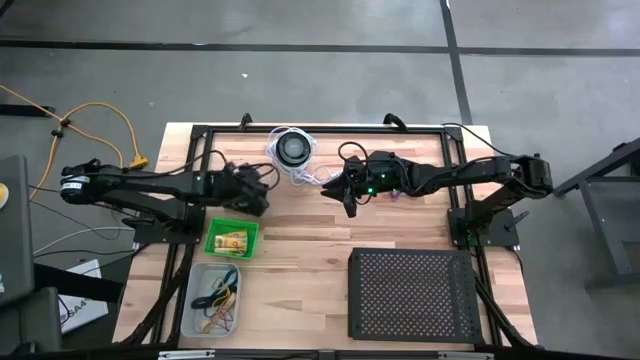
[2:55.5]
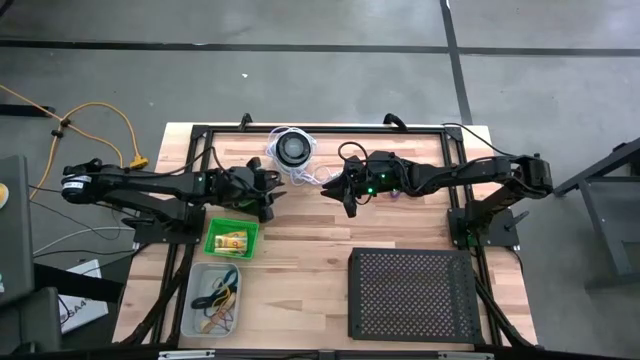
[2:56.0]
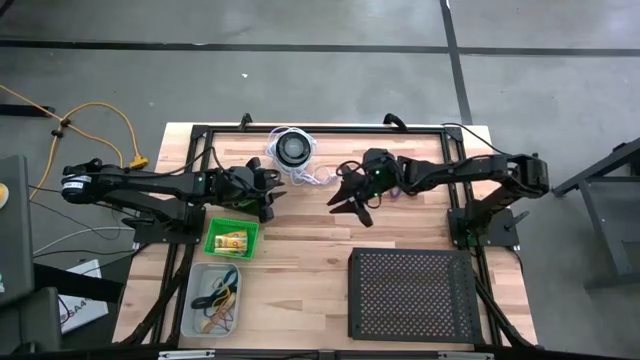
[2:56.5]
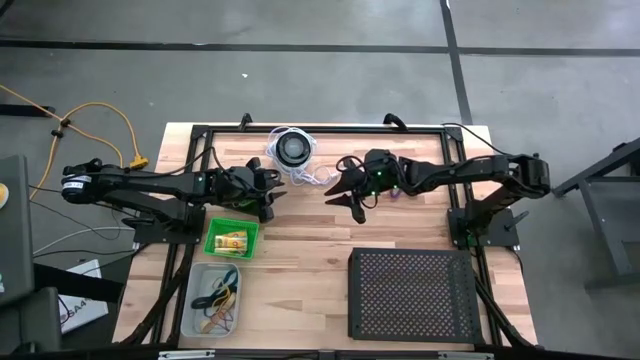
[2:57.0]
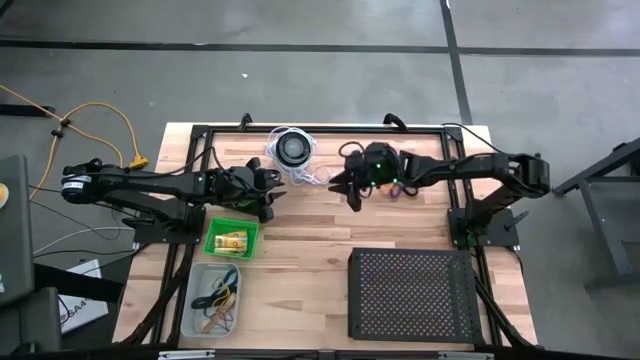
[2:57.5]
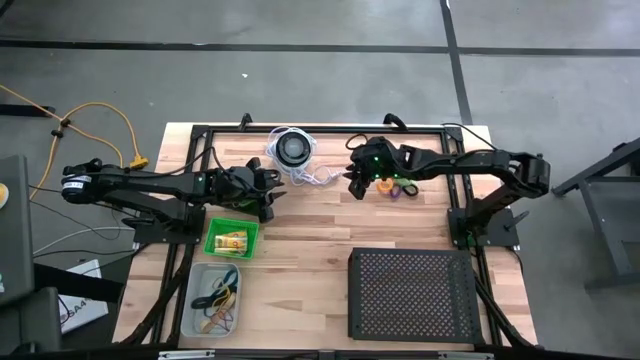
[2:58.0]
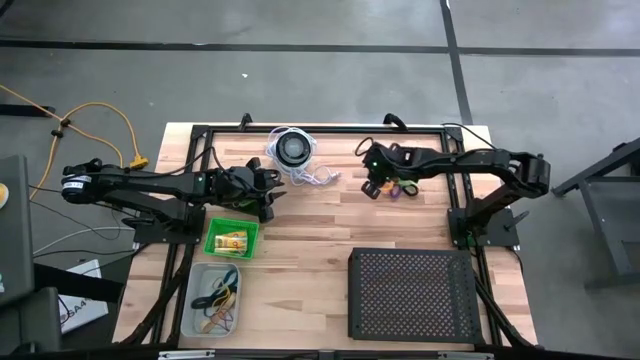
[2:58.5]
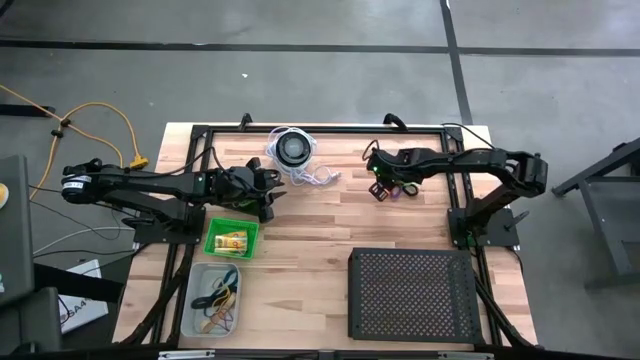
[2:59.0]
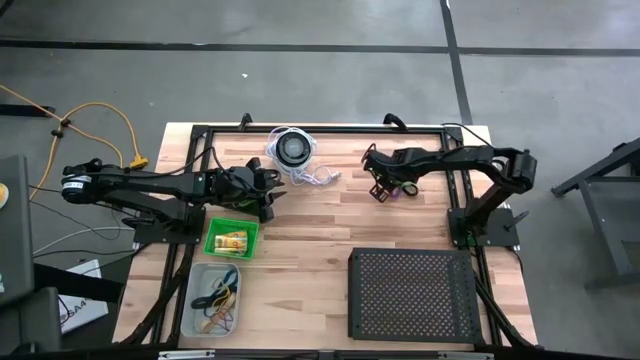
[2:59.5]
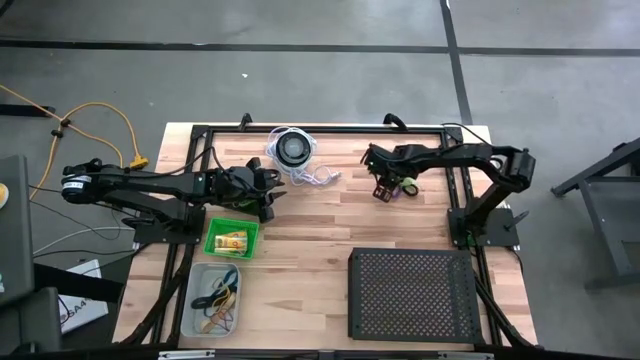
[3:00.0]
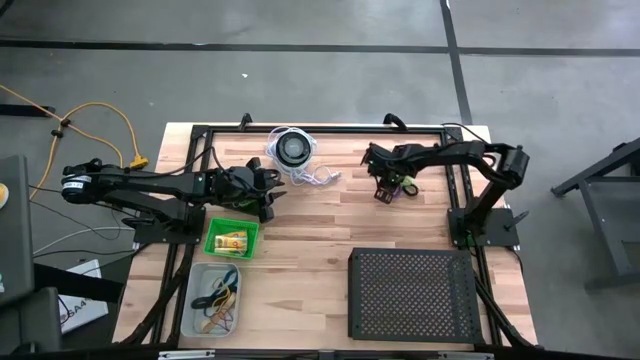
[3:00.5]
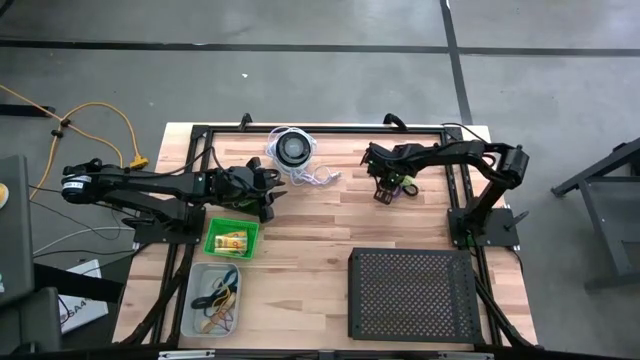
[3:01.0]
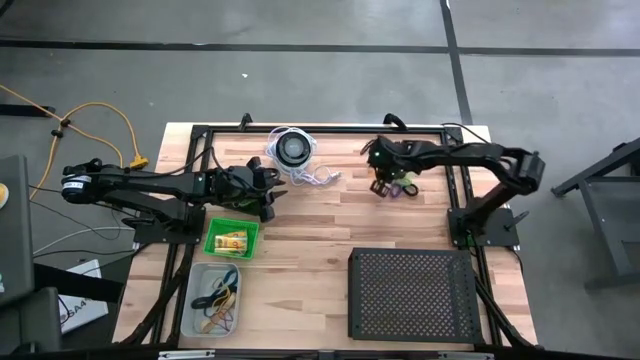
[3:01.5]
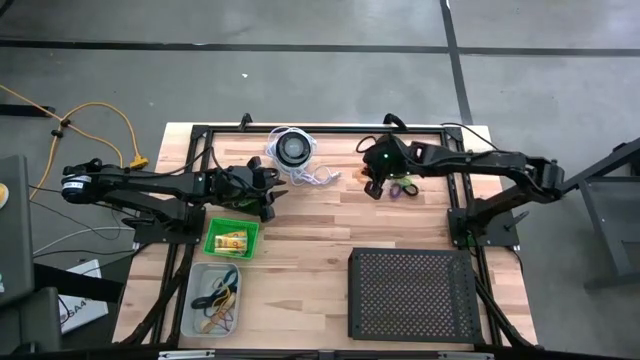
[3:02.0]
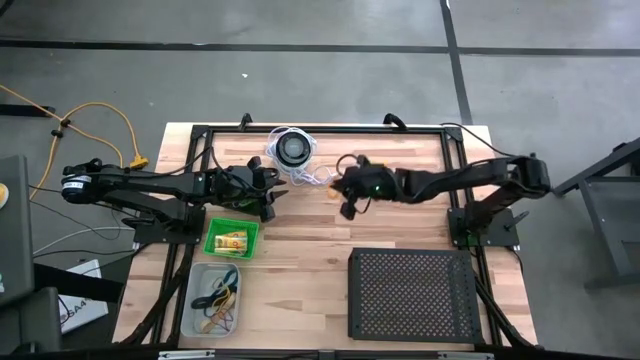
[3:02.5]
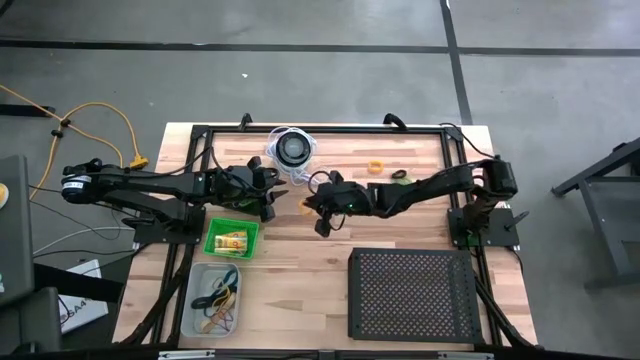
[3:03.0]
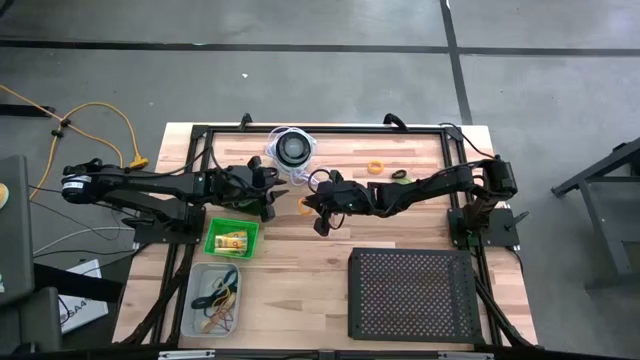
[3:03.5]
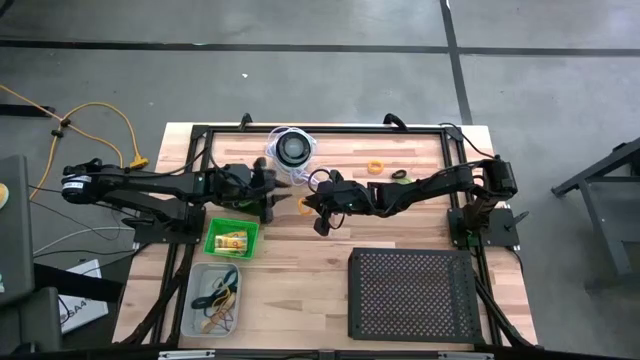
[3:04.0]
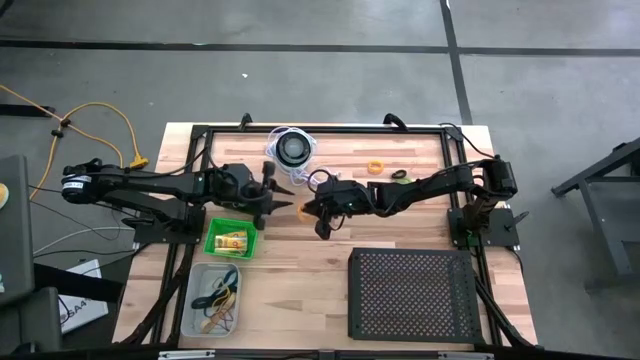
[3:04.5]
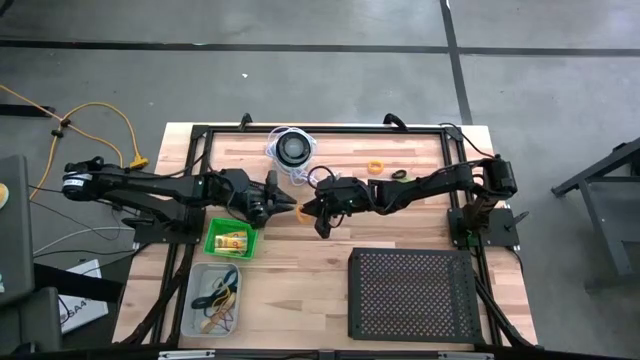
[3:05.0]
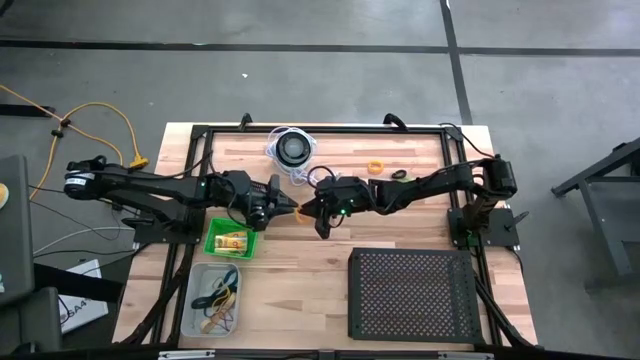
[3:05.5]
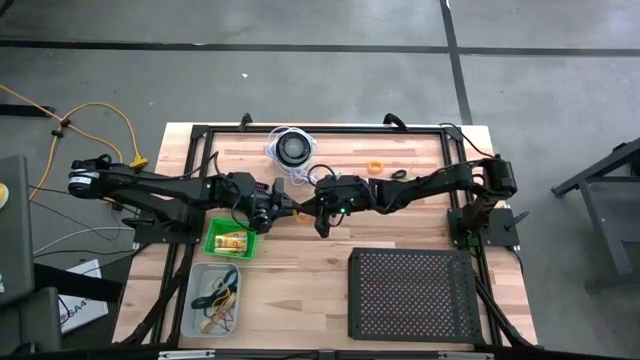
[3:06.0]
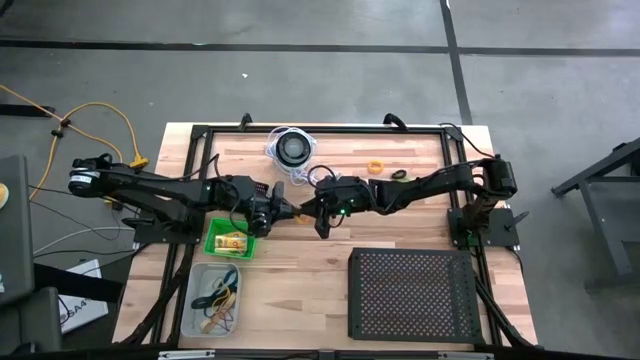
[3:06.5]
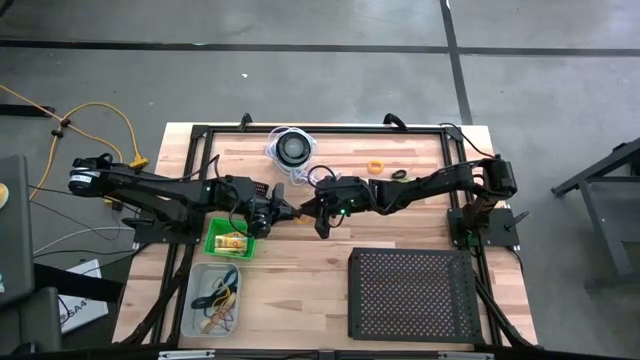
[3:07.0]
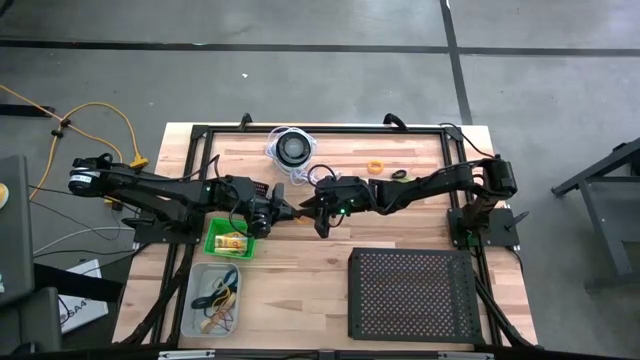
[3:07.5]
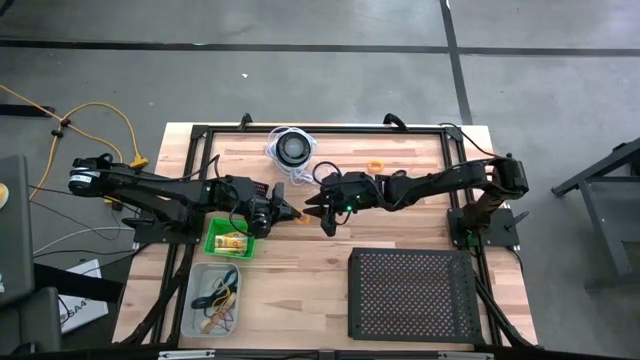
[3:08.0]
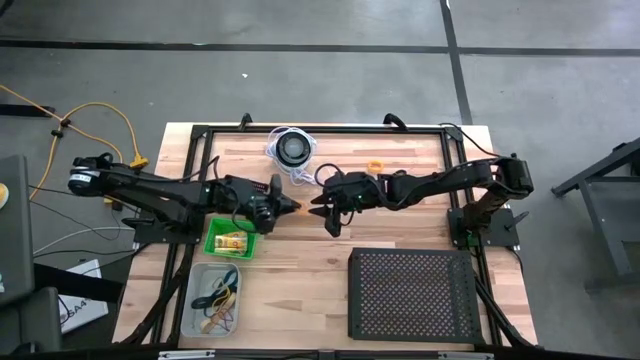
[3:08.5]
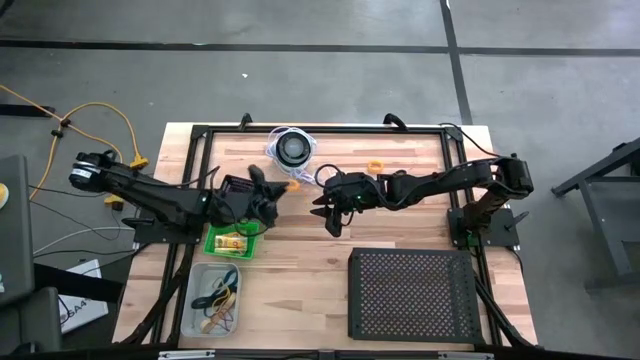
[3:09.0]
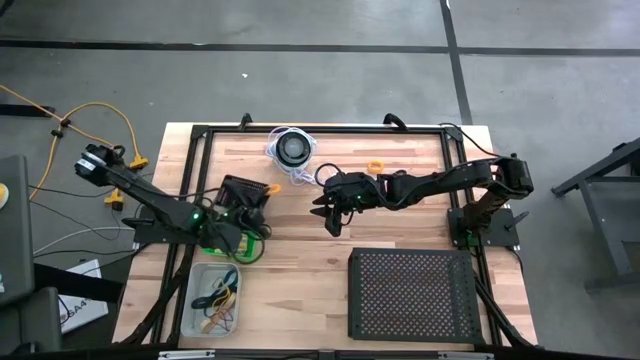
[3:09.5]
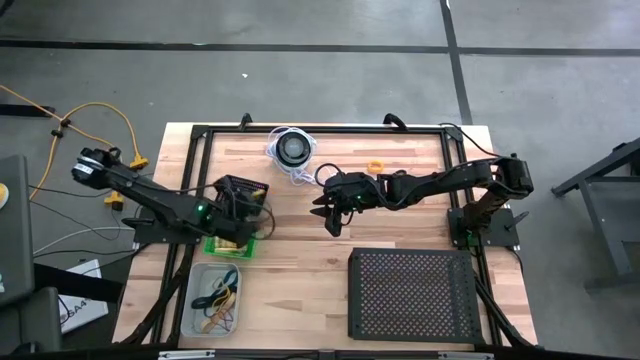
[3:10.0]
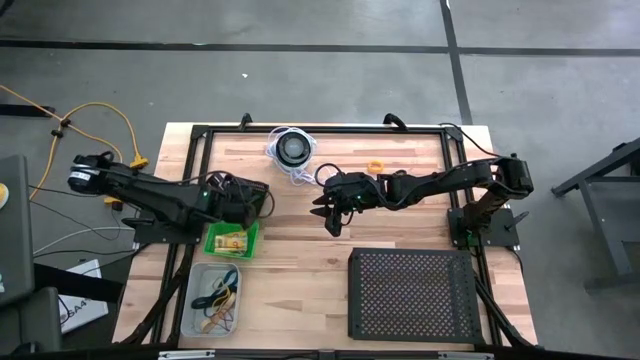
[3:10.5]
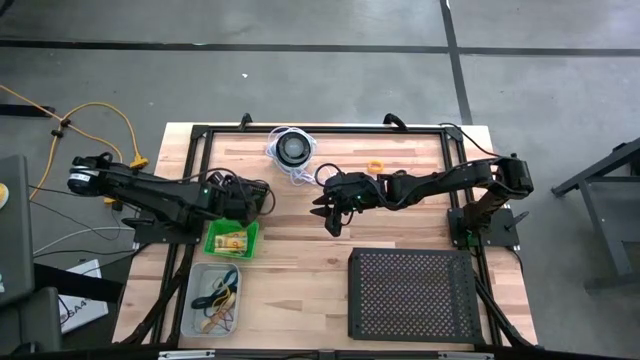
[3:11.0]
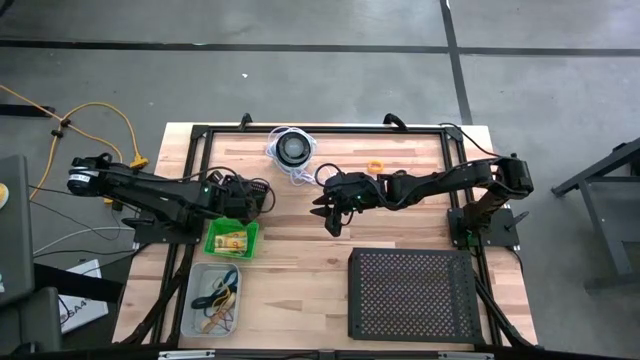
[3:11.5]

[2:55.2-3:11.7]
Task: Pick & Place Office Desk Supplies
Put the yellow coil keychain into the black bin

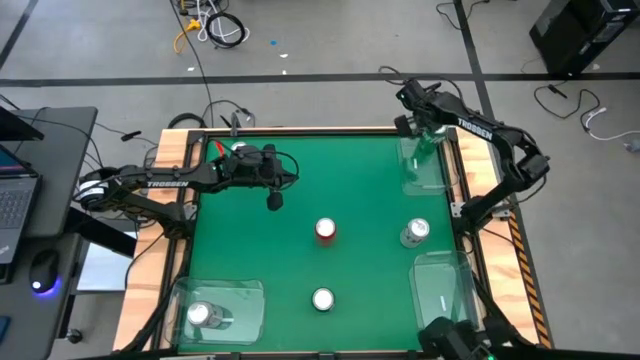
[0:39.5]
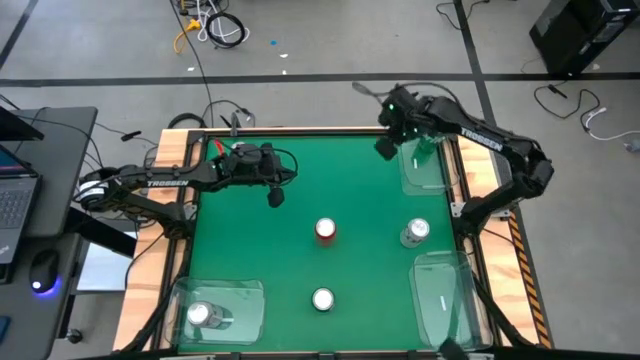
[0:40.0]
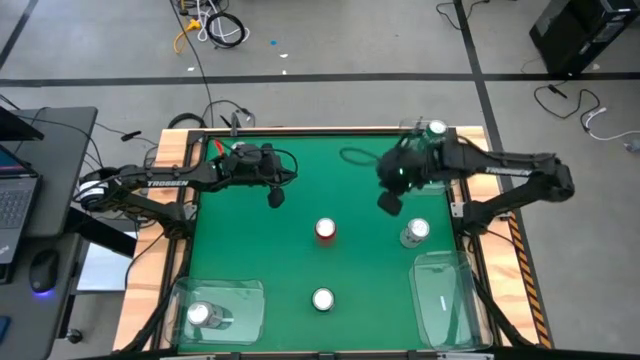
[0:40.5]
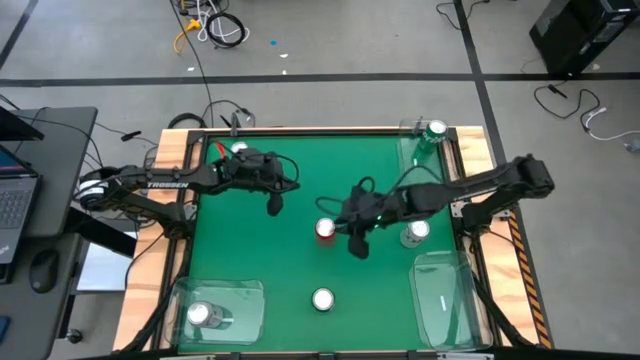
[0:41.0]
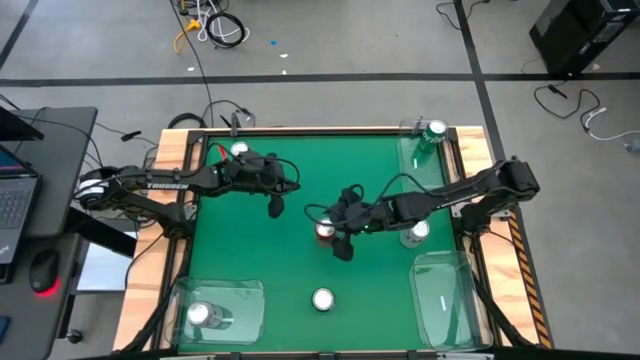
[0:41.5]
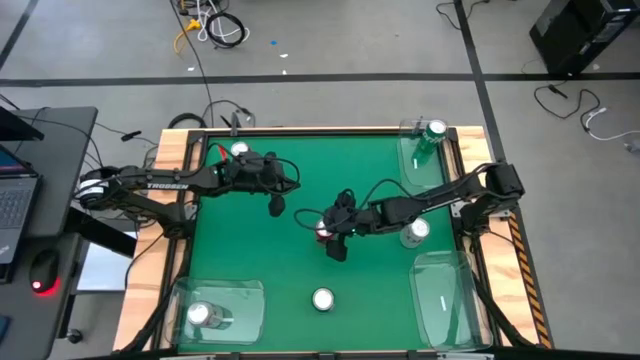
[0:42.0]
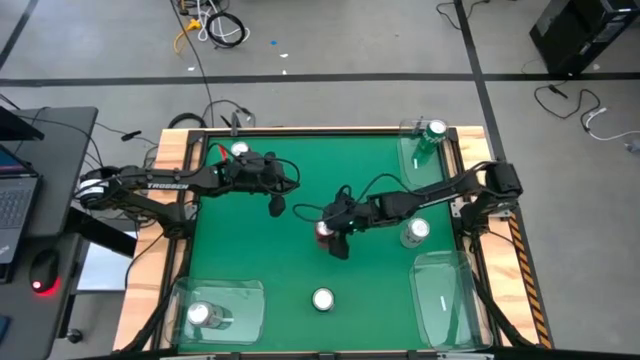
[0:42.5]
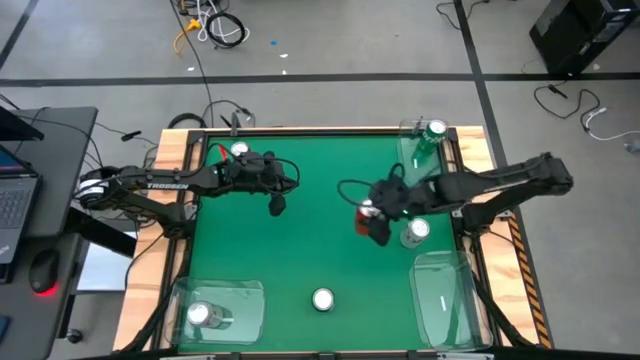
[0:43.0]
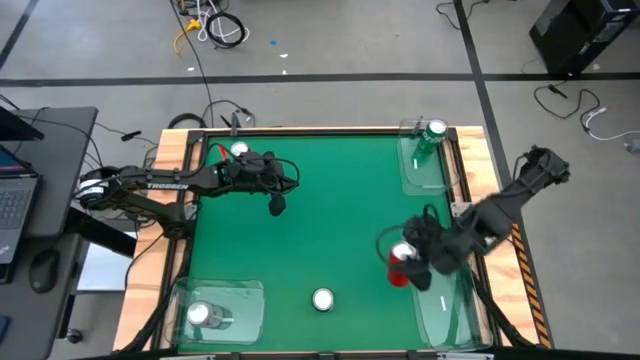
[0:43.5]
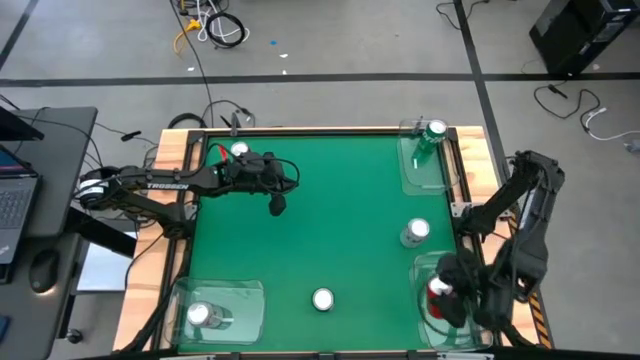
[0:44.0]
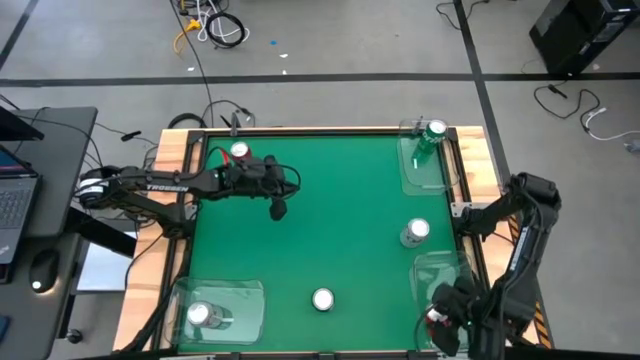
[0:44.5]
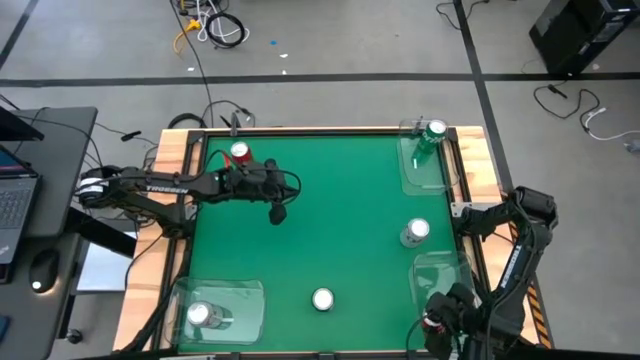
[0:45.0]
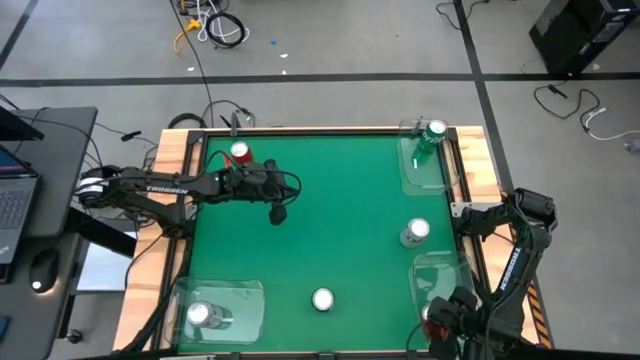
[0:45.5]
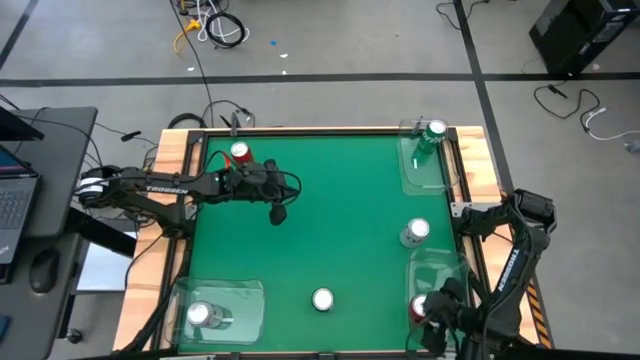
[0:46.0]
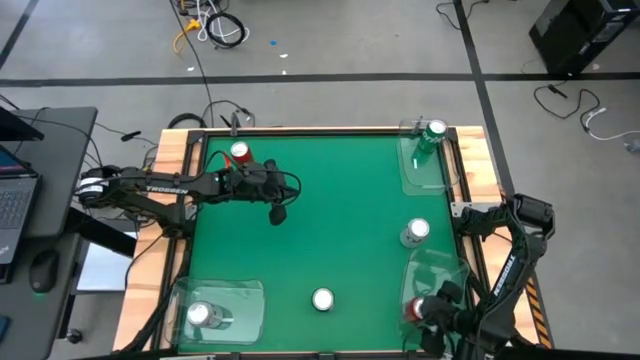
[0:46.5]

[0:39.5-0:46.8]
Task: Sort soda cans
Put the bottom red-black soda can into the bottom right transparent bin
